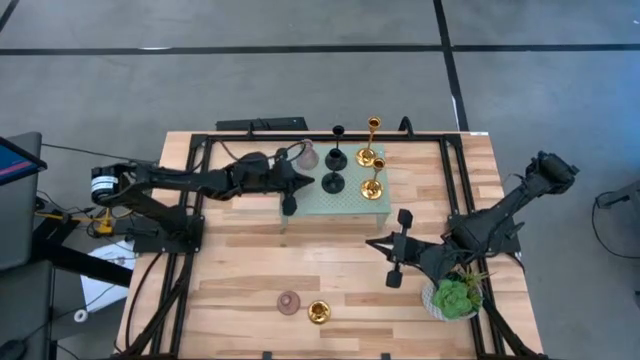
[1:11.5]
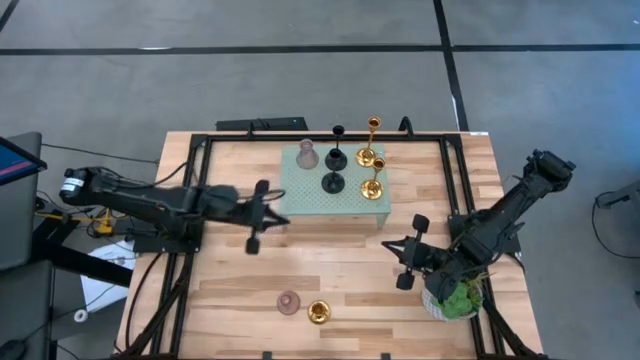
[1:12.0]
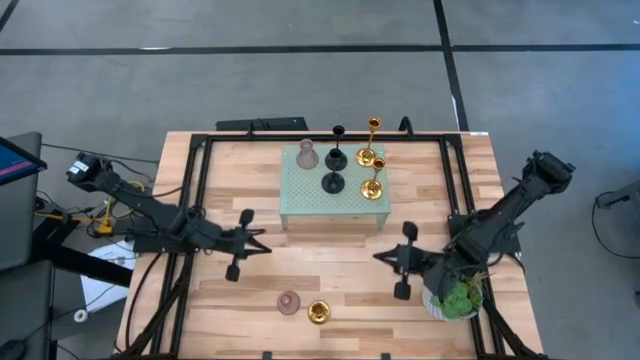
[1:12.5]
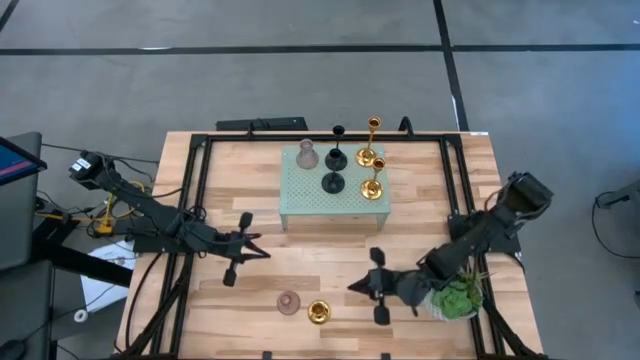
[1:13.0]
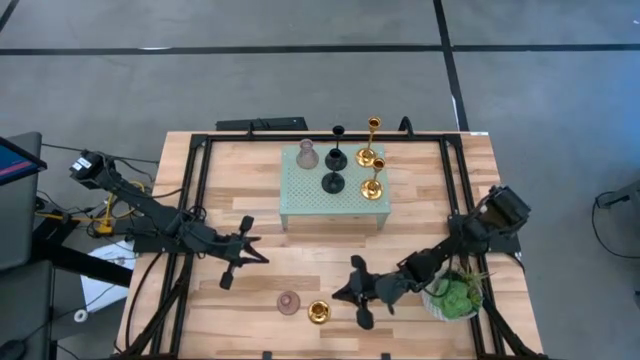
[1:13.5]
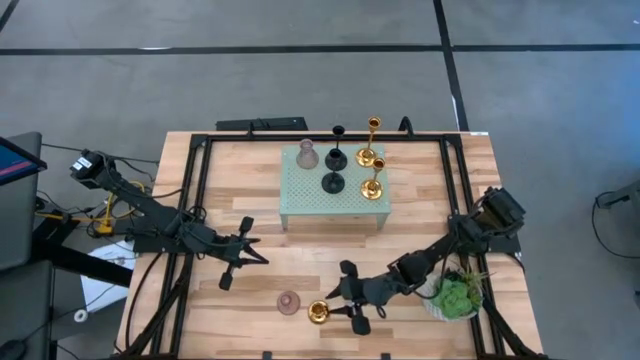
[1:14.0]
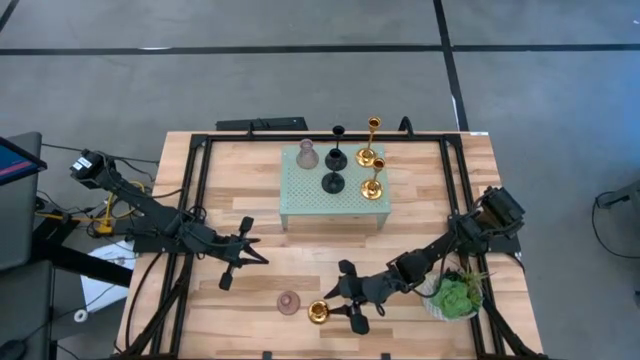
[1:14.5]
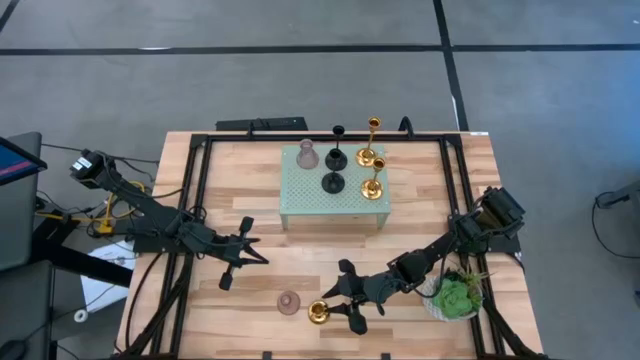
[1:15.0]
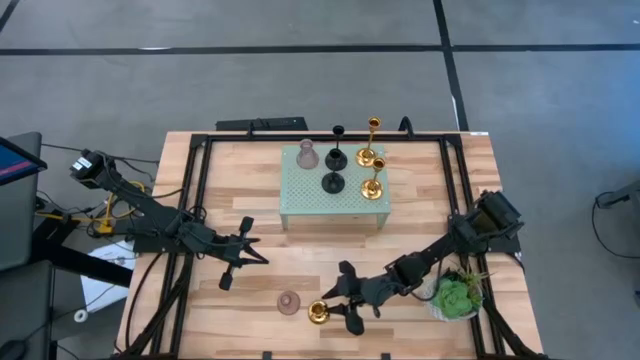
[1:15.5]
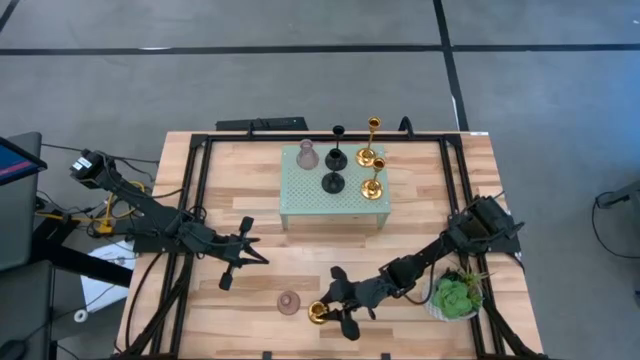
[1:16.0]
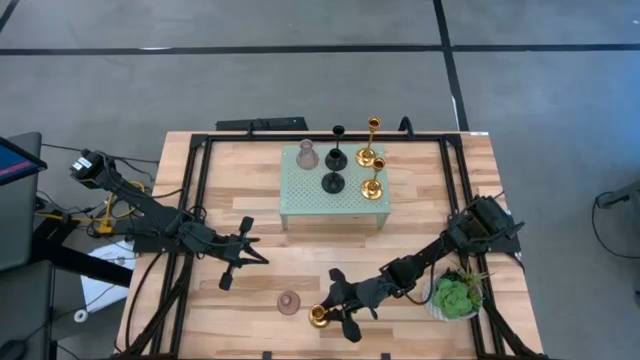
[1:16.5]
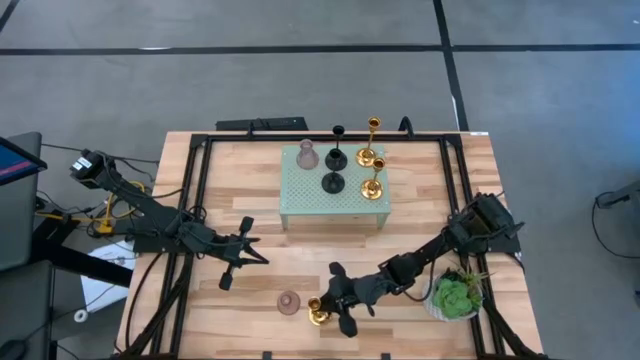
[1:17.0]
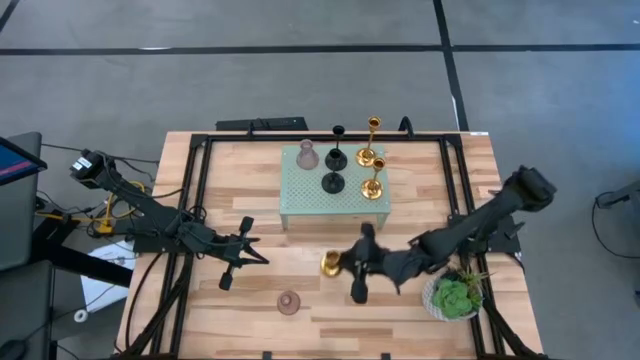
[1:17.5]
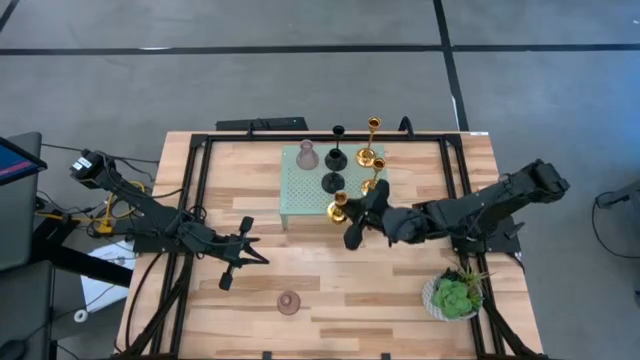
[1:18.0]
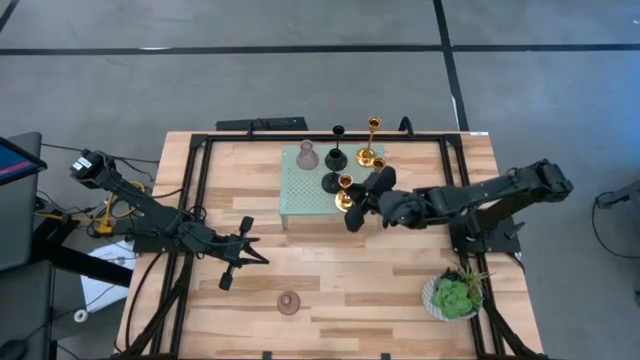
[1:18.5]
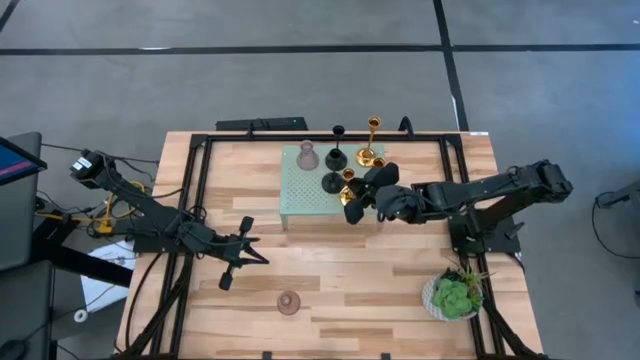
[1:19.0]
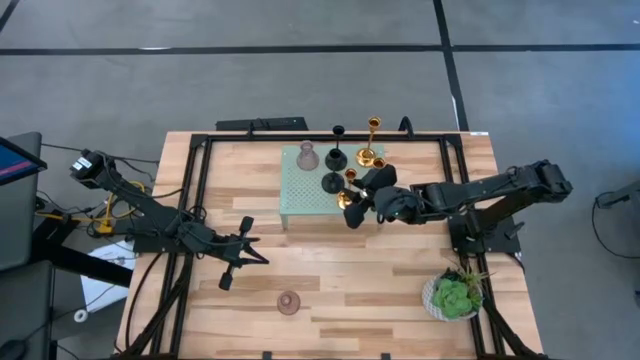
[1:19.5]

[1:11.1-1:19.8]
Task: Pick & Place candle stick holders
Put the gold candle holder on the shelf aligned with the other gold candle holder

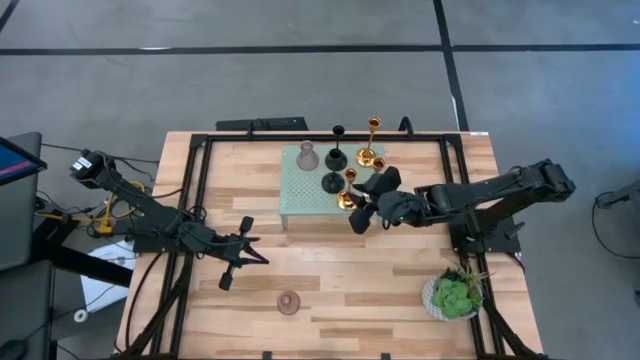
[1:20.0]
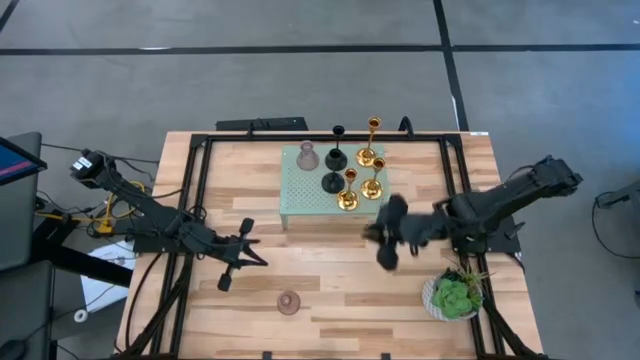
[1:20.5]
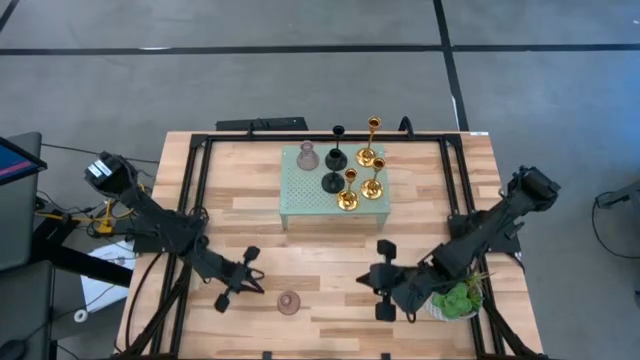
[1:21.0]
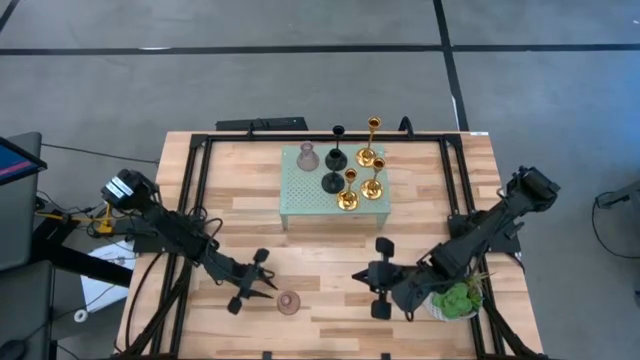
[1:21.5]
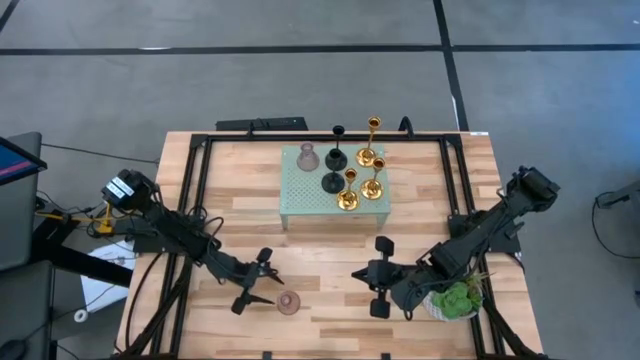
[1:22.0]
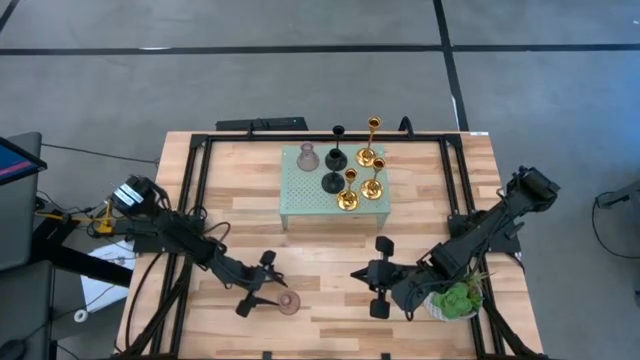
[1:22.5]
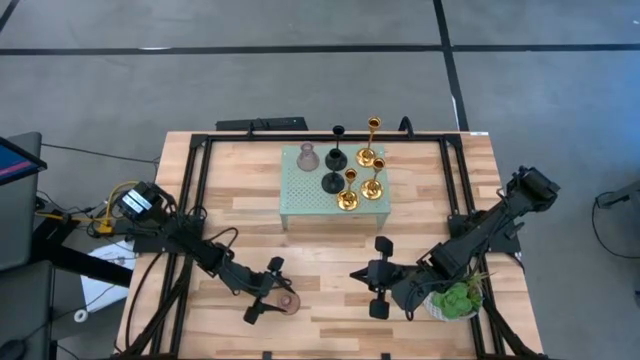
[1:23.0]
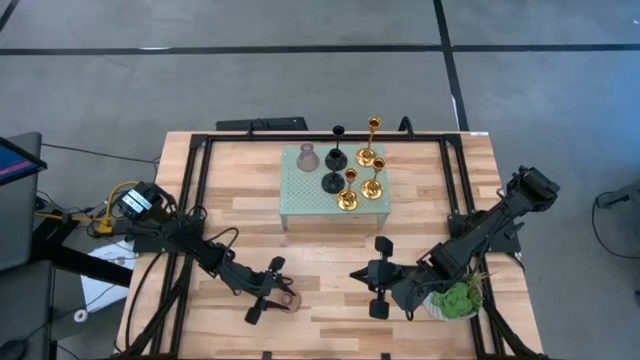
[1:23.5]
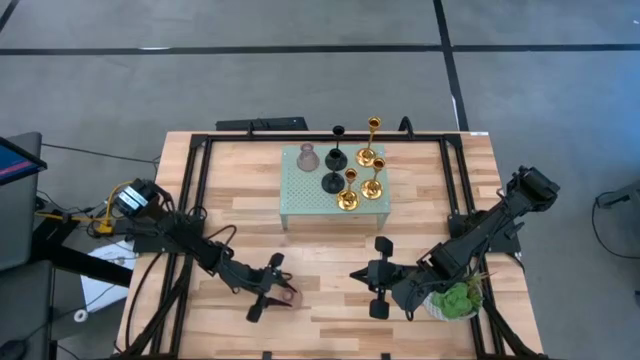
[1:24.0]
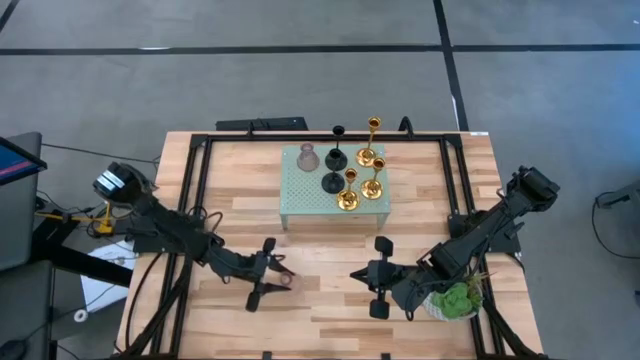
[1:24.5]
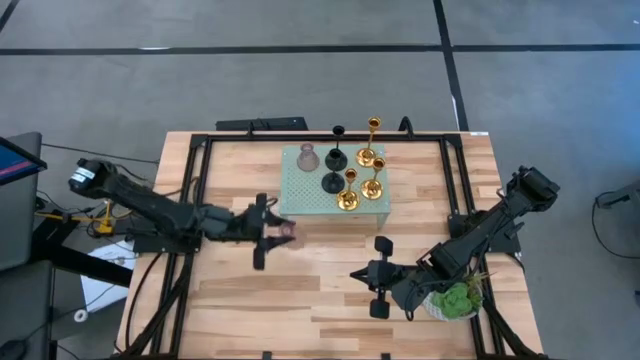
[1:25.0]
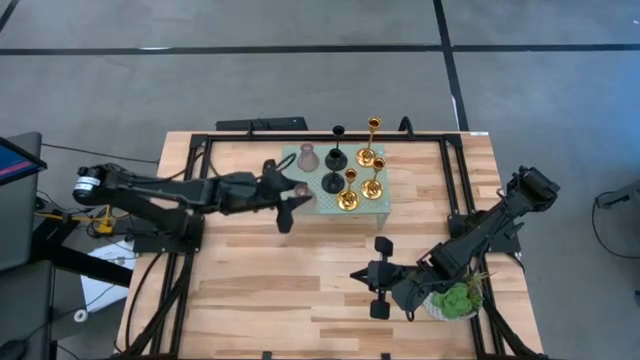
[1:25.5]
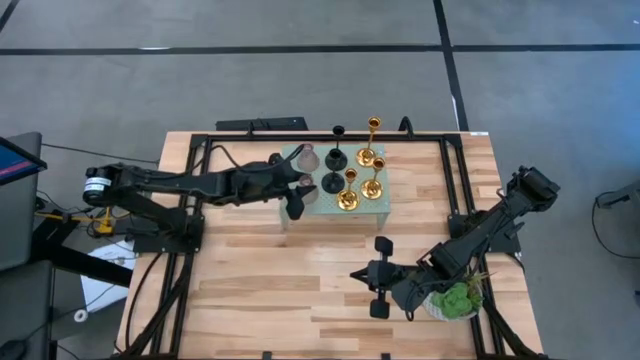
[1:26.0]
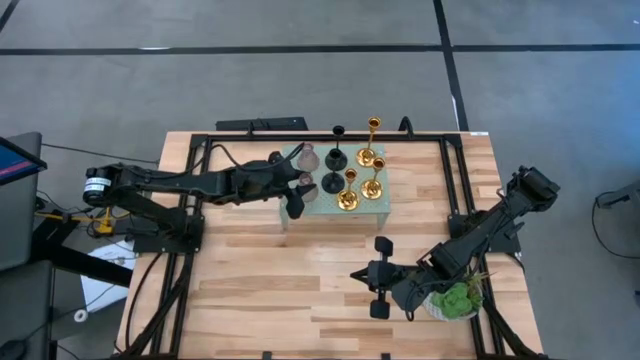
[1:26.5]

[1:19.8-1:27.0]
Put the pink candle holder on the shelf aligned with the other pink candle holder

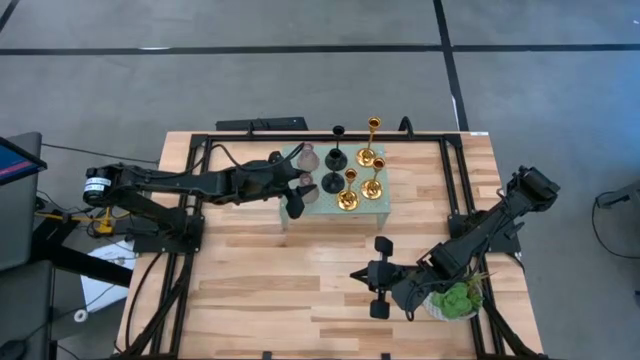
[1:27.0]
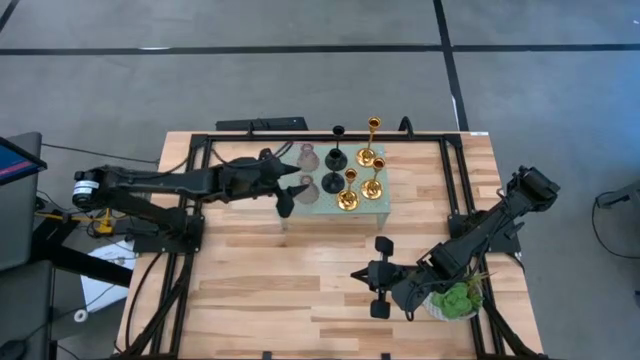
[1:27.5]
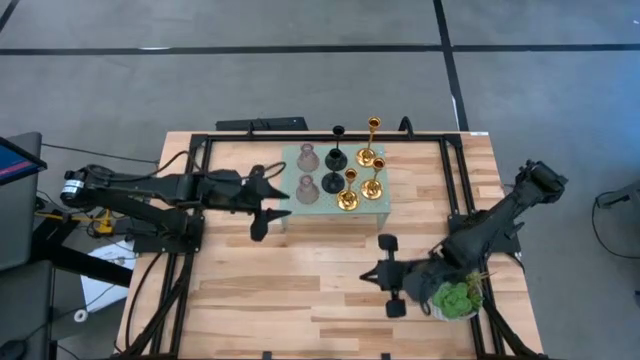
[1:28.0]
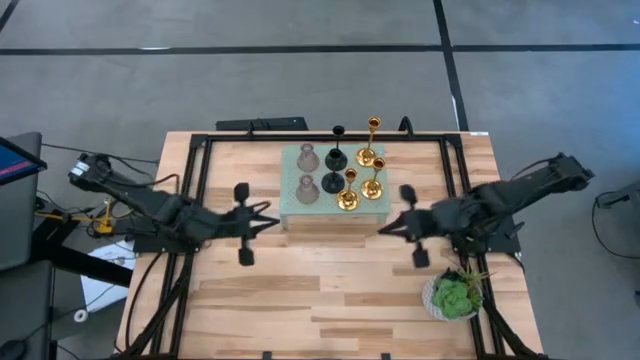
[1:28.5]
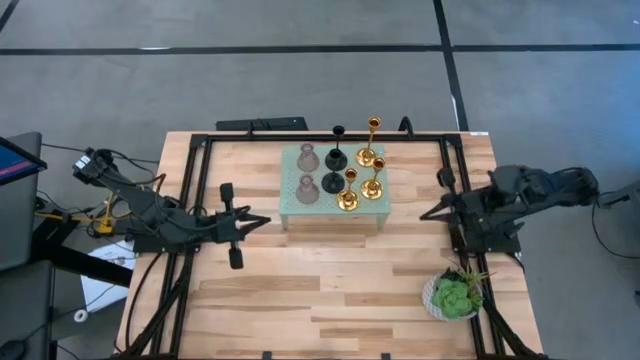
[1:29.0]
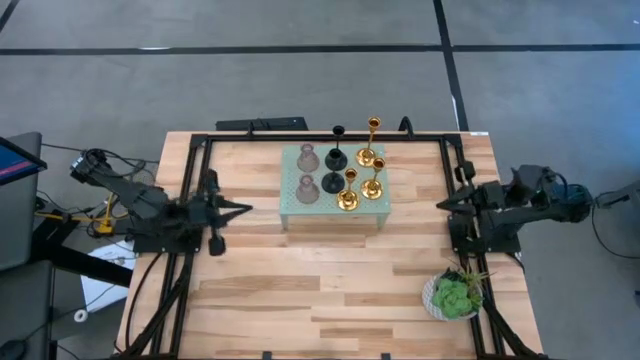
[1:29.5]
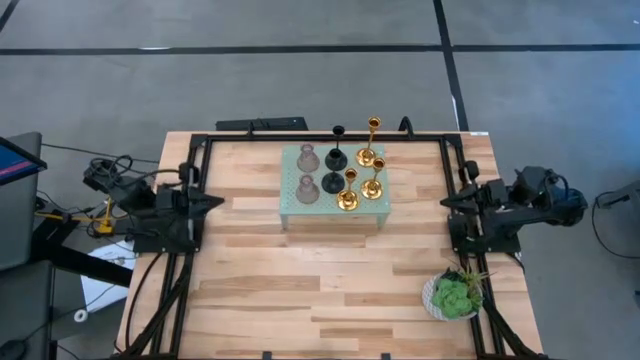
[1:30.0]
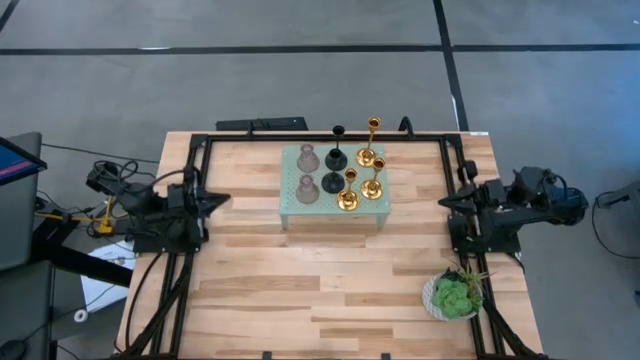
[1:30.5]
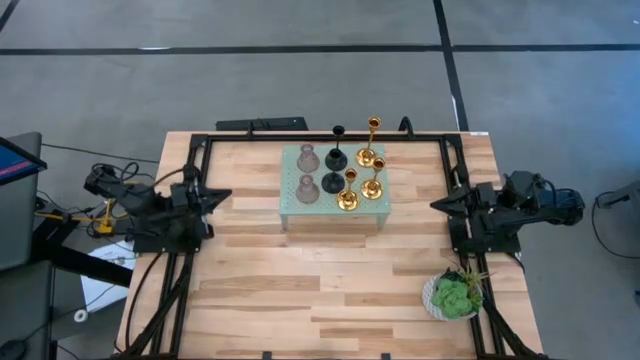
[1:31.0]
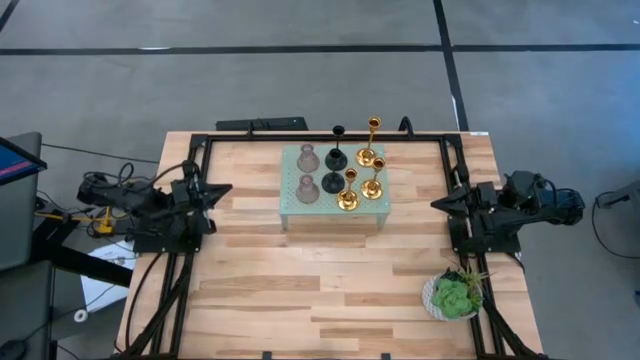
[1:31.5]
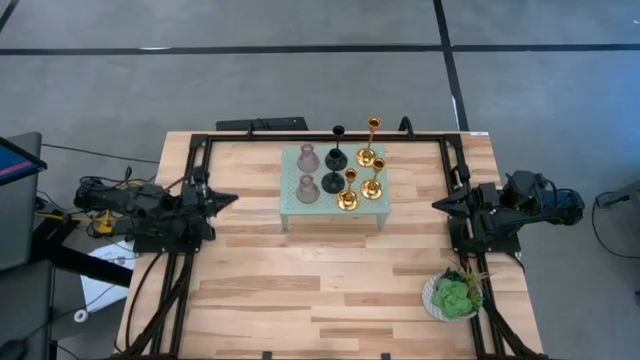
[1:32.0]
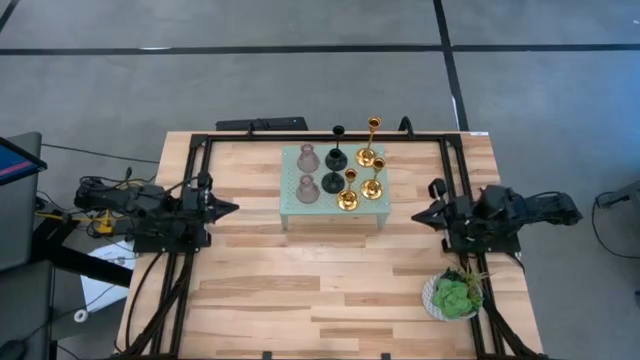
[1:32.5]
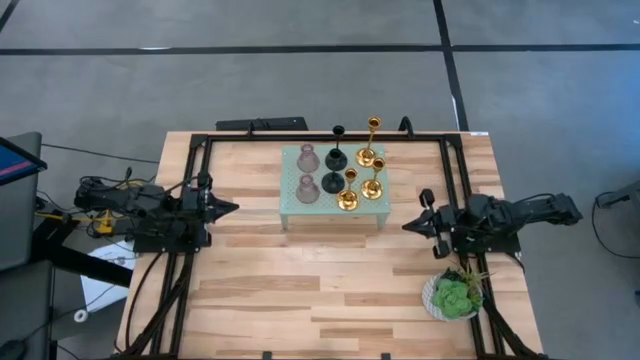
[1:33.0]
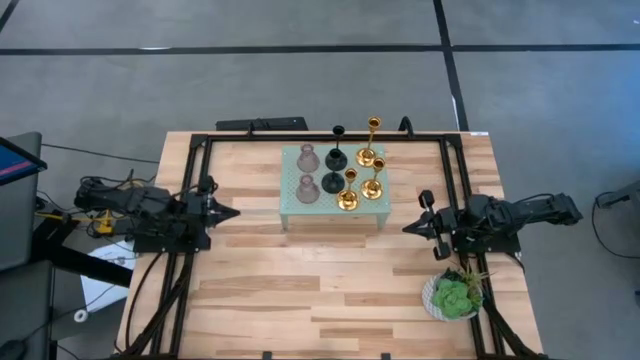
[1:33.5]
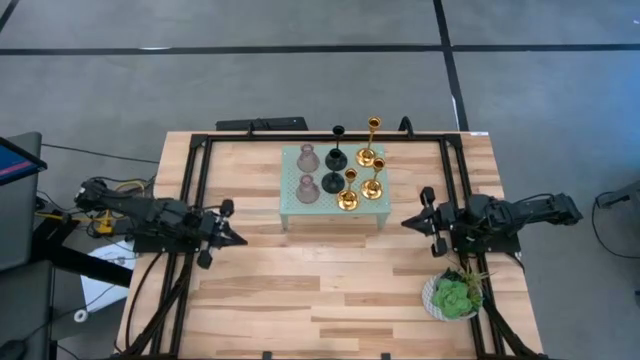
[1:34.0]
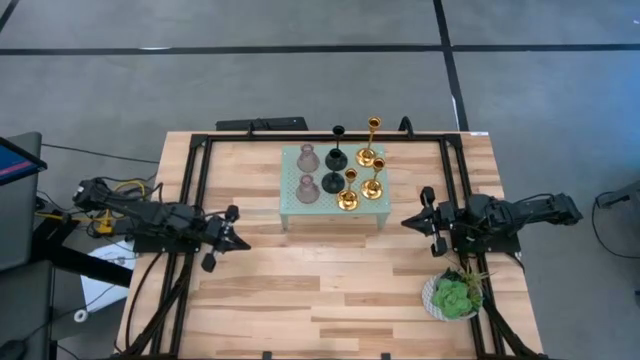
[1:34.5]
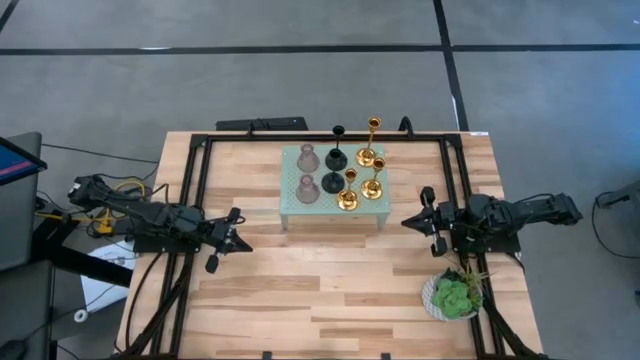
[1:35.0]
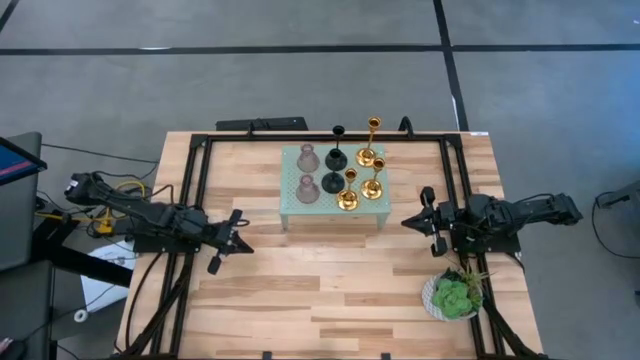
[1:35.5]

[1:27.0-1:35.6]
Return to Home Position
